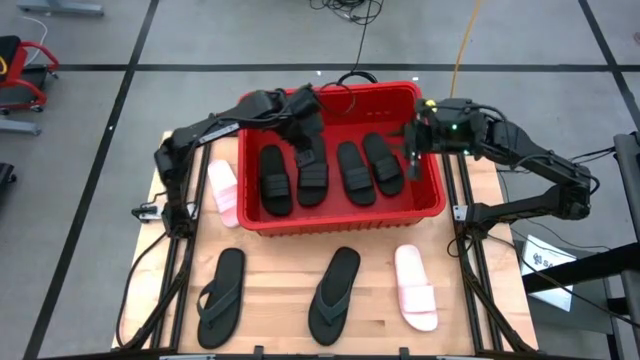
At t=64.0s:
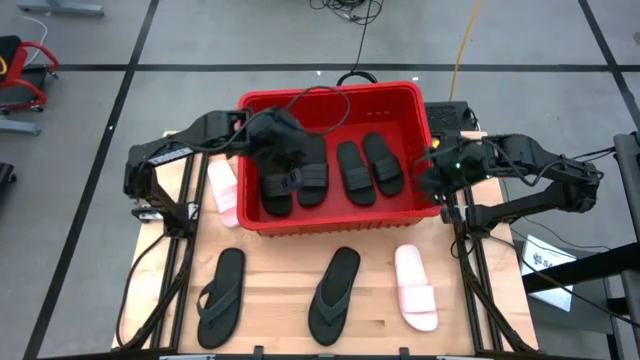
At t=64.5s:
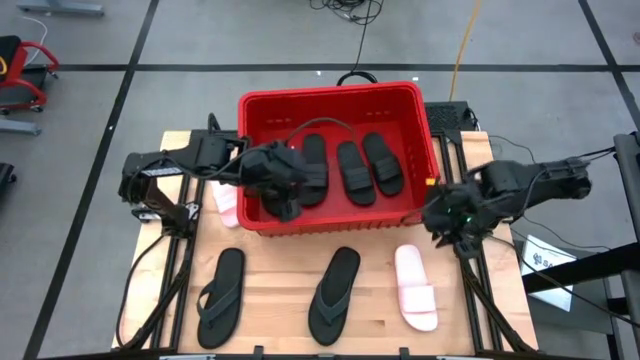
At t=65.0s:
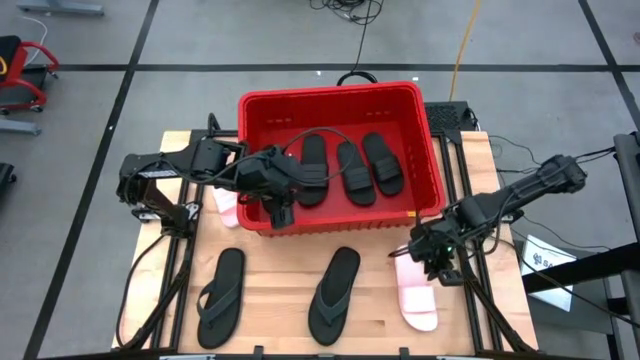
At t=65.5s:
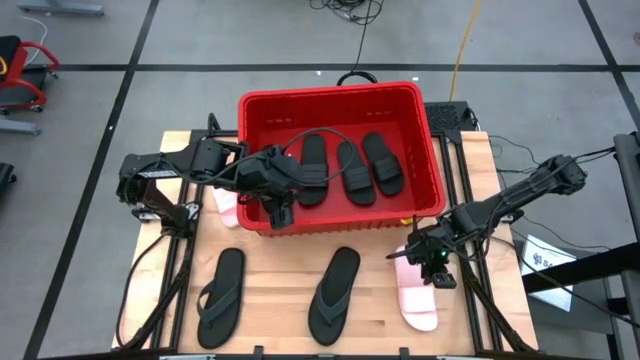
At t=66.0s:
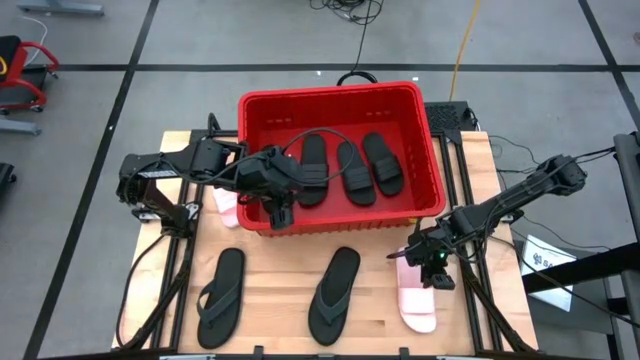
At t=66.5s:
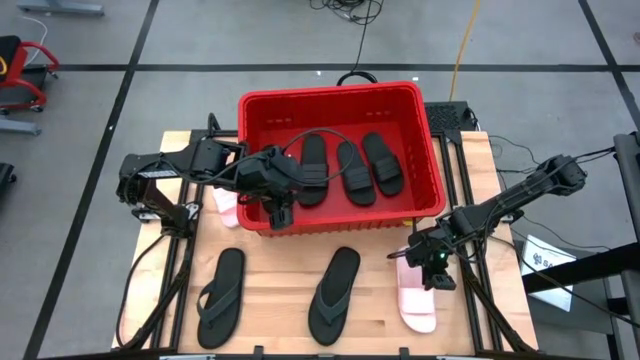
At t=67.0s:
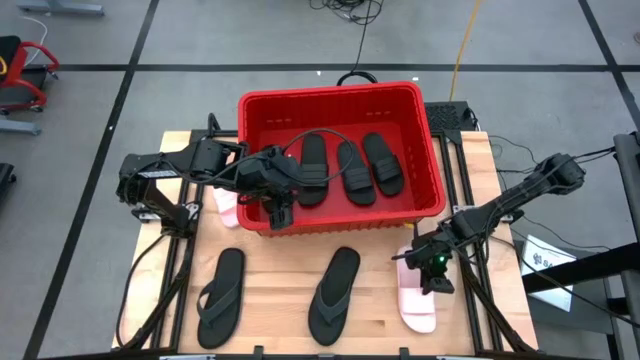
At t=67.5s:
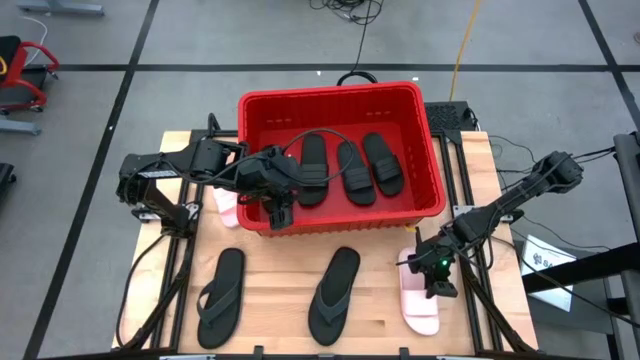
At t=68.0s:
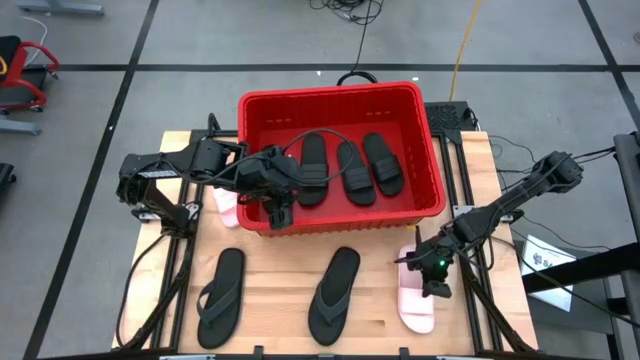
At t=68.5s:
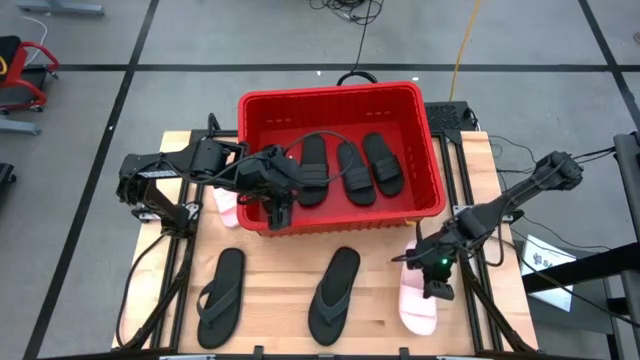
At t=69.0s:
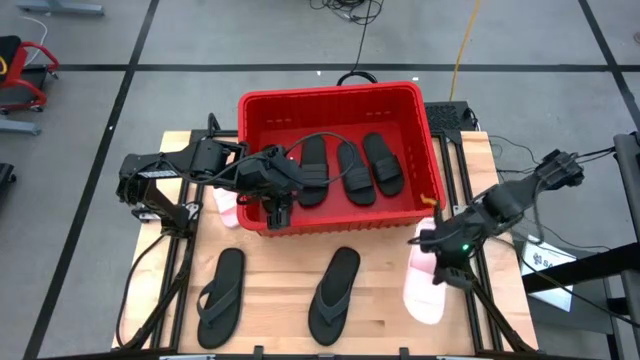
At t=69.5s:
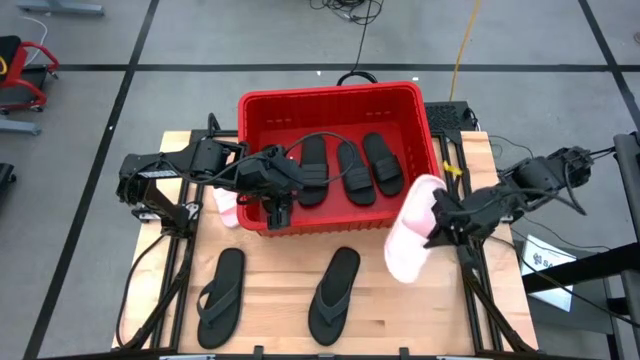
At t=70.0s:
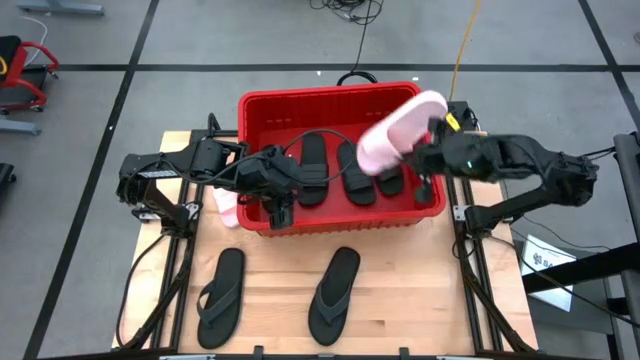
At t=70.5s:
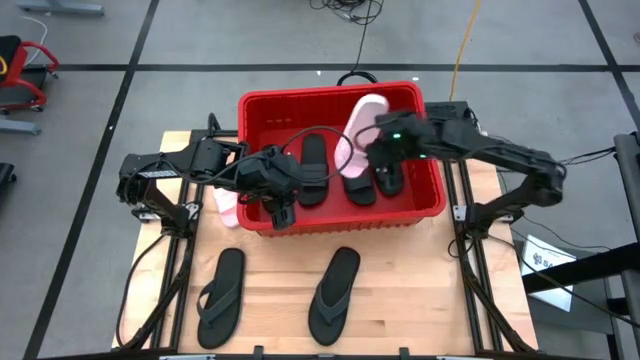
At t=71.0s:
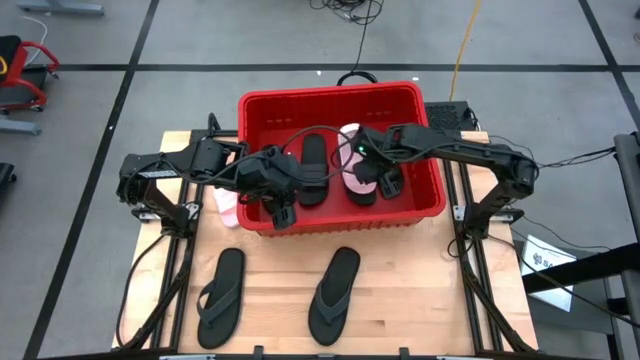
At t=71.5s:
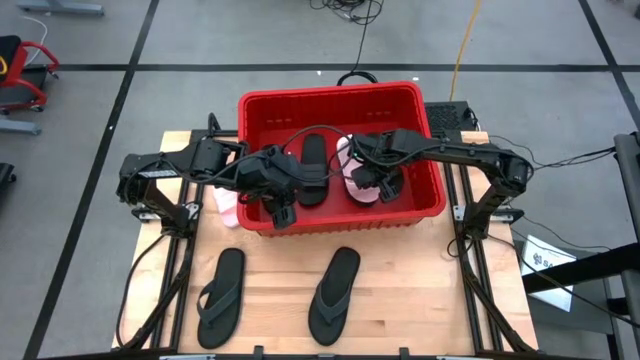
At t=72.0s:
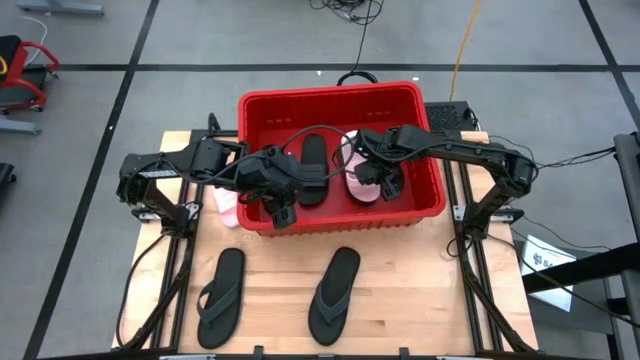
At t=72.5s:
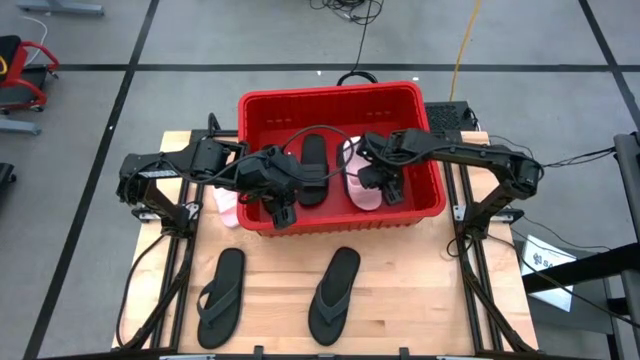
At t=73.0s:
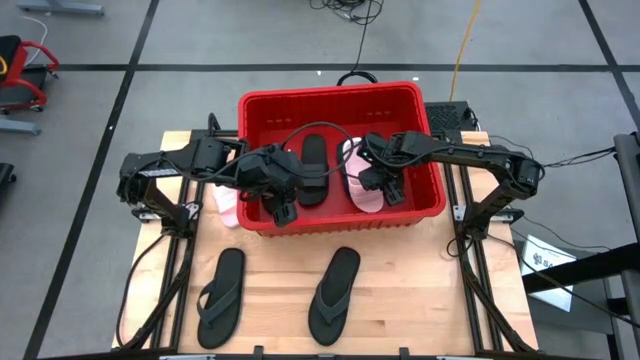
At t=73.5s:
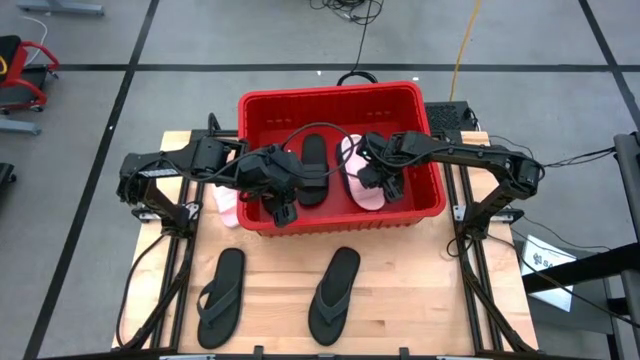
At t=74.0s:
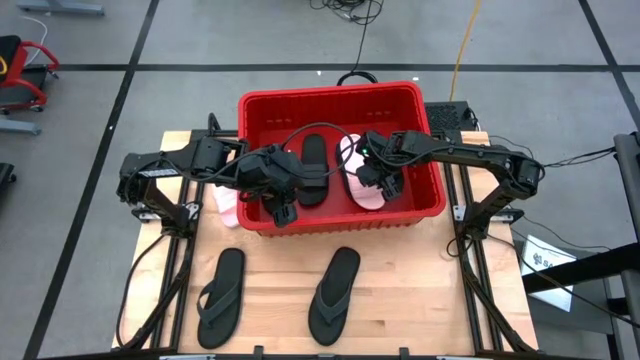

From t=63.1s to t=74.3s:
Task: Pick and place slides into bin
Put the pink slipper into the red organizer bin

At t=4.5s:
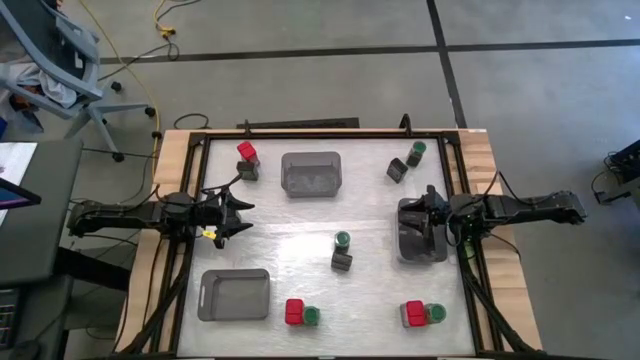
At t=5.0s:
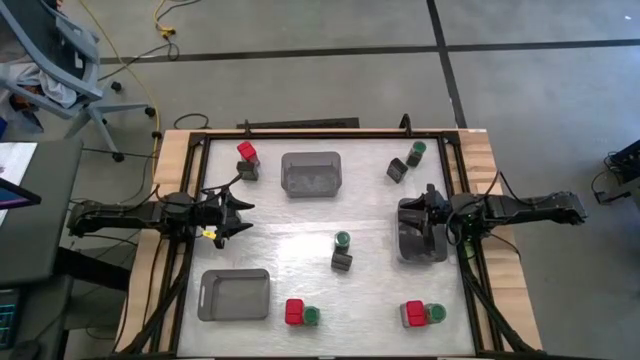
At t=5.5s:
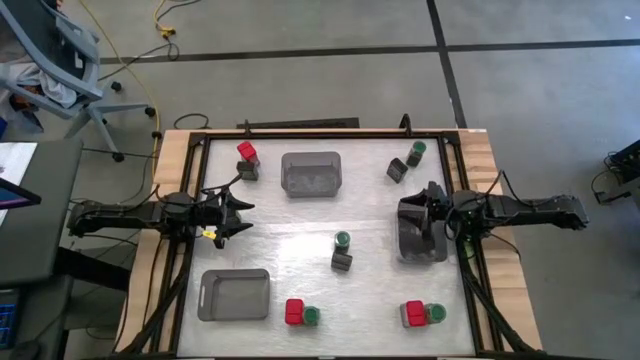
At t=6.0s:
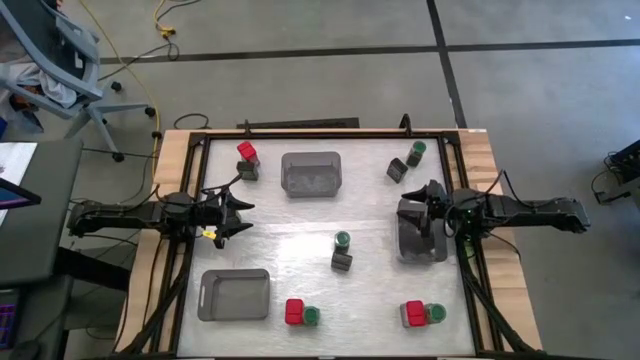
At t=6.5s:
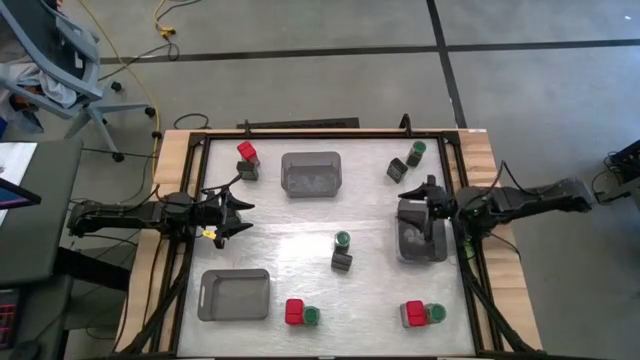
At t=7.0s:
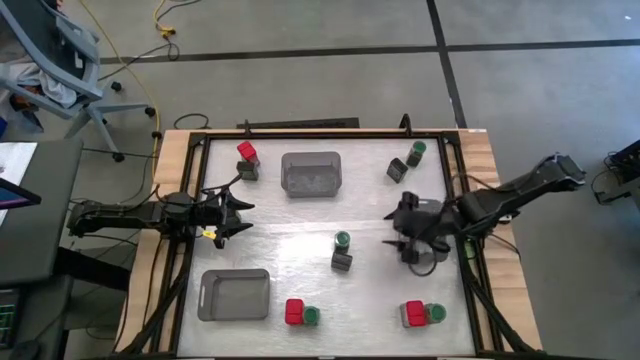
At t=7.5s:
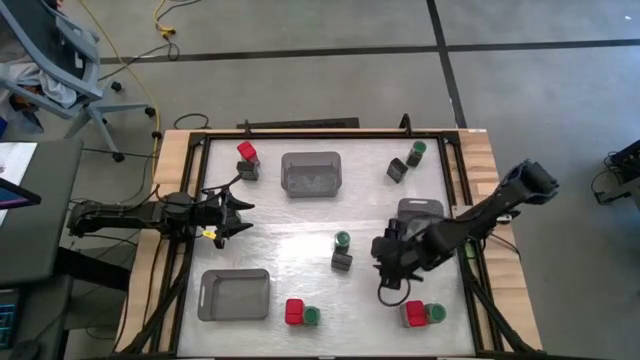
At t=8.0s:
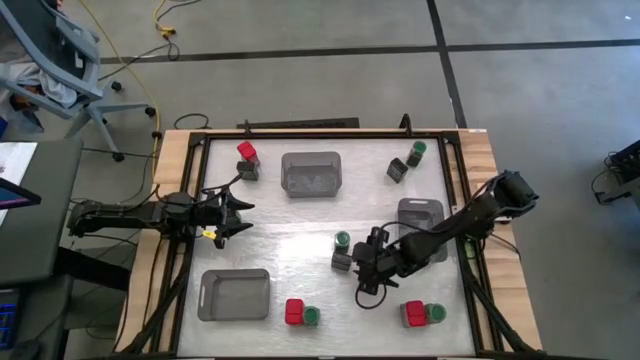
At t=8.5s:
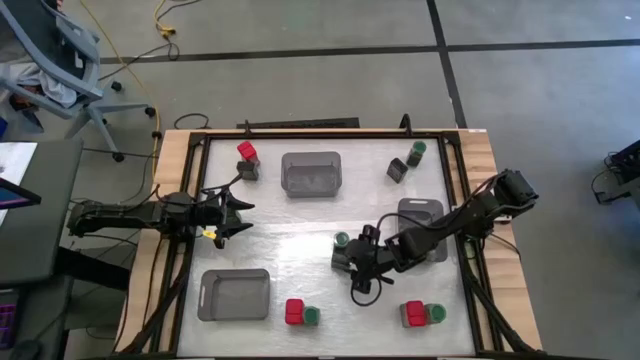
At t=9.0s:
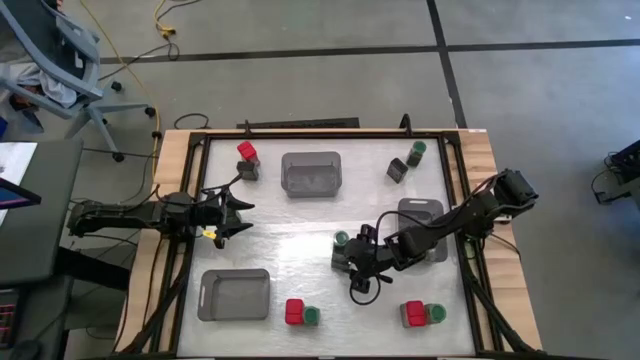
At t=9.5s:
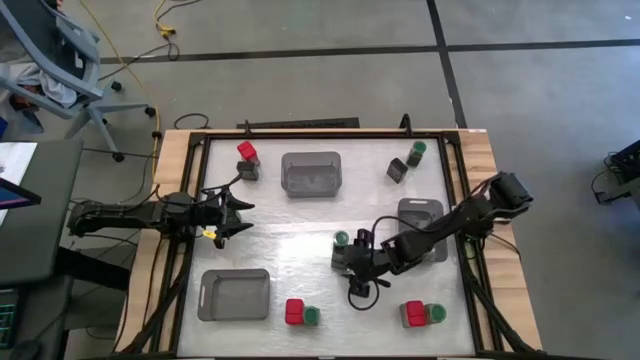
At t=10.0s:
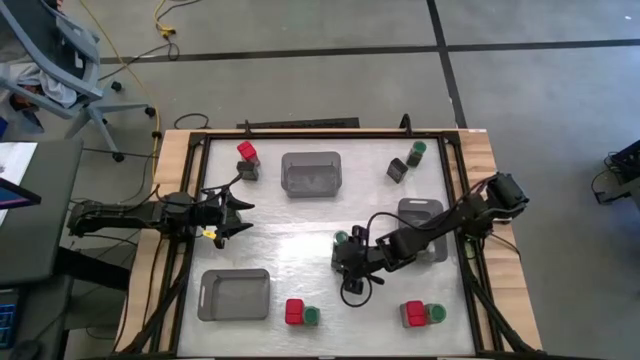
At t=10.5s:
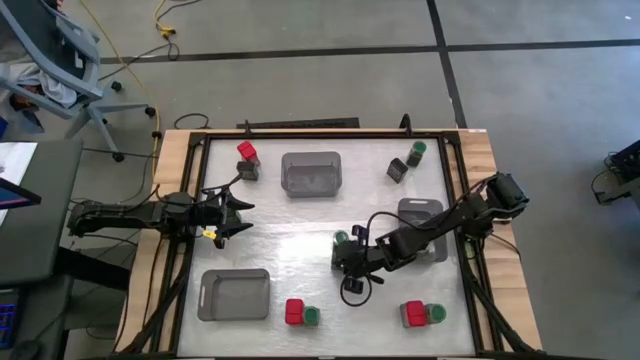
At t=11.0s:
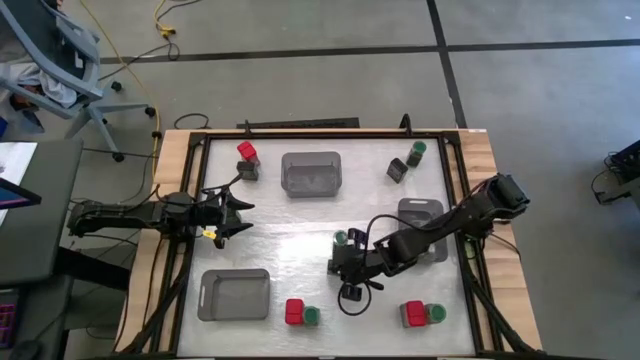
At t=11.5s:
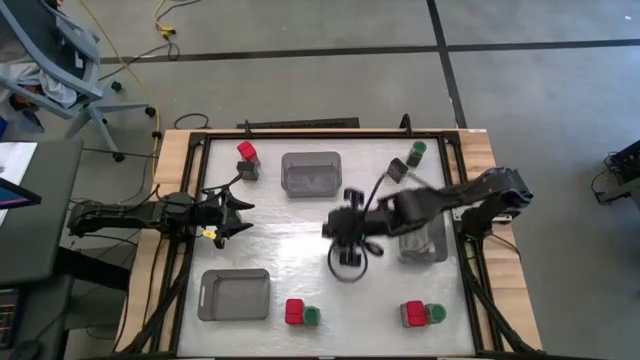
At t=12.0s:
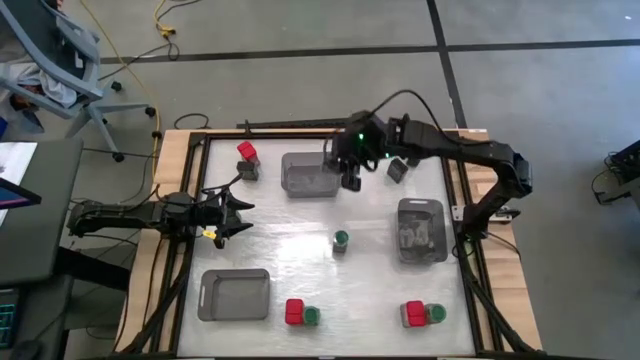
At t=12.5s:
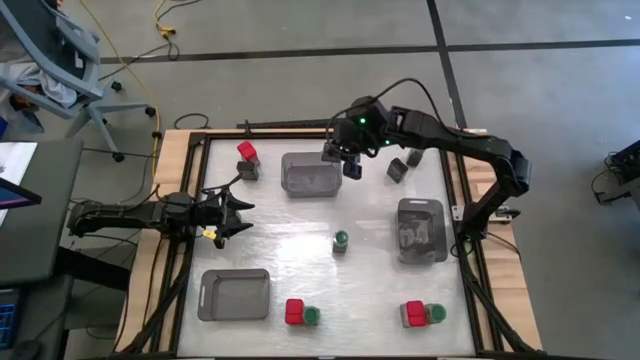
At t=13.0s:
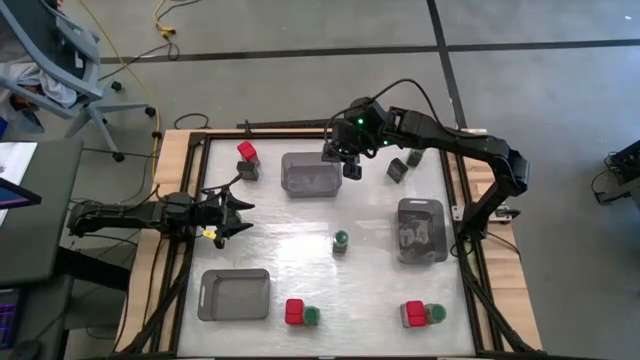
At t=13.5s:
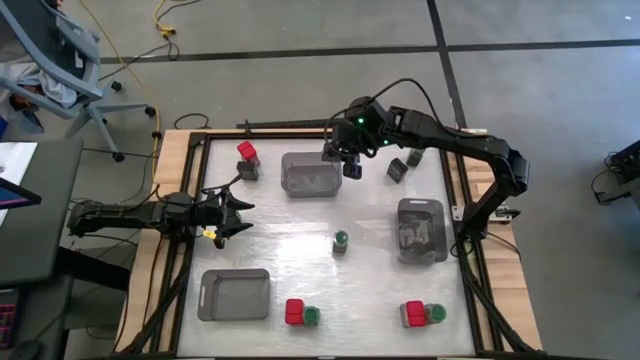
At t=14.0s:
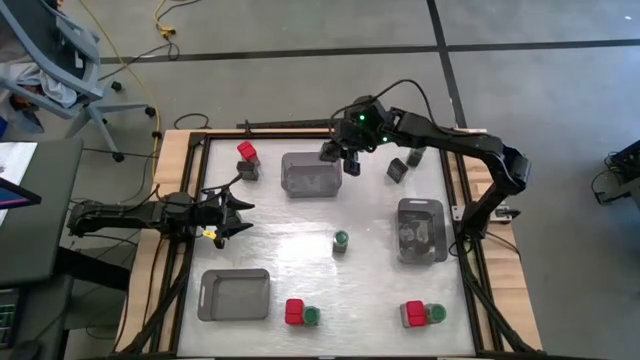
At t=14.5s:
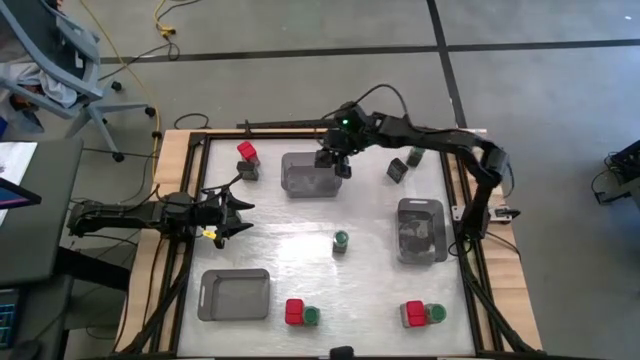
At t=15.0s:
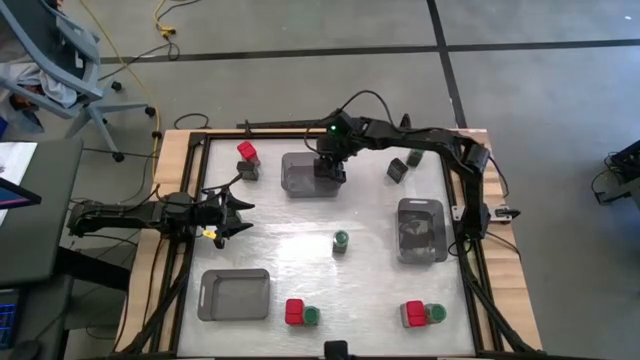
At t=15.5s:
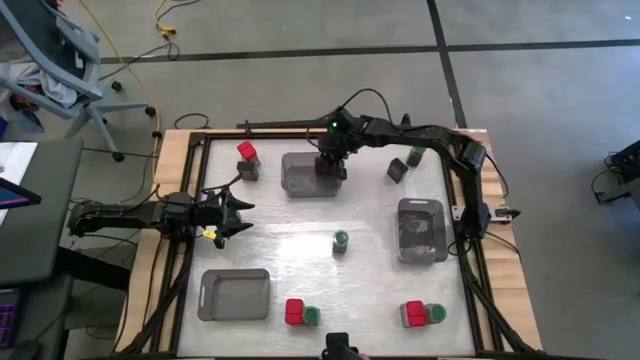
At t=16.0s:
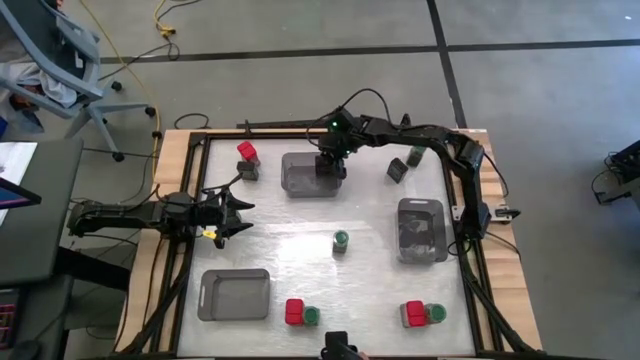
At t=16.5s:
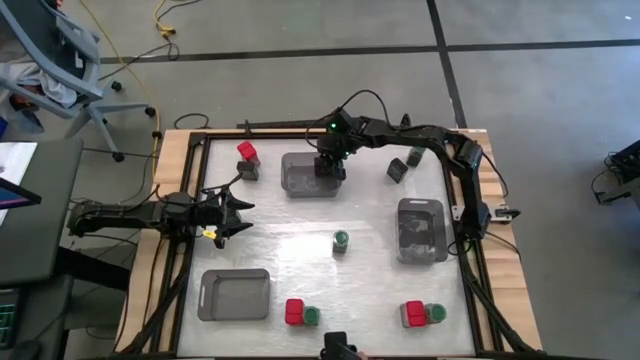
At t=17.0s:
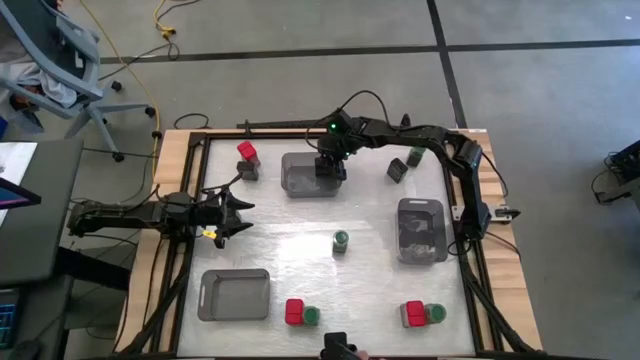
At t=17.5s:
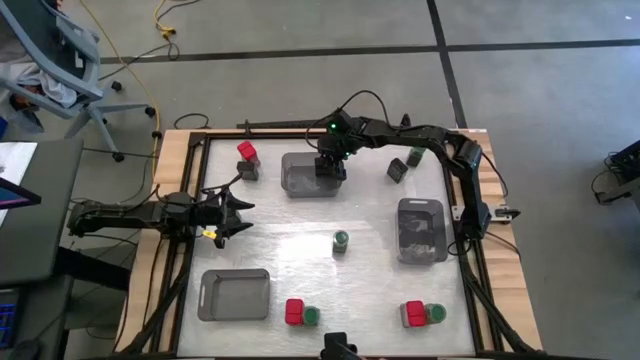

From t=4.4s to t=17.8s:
Task: Sort spices by type
Put the bottom black seasoning can into the top black transparent bin
